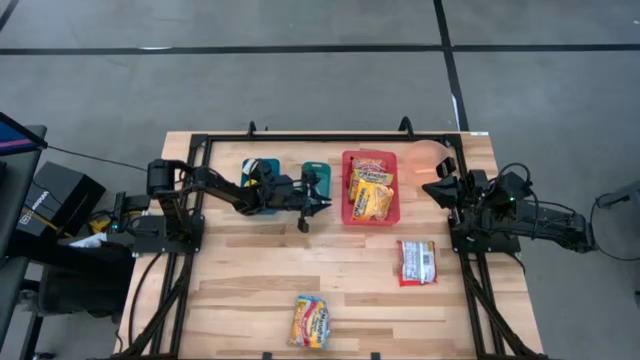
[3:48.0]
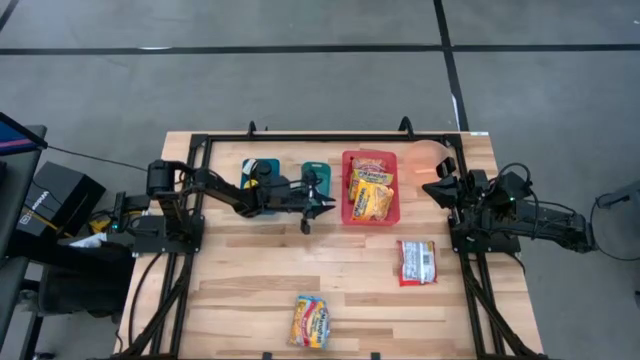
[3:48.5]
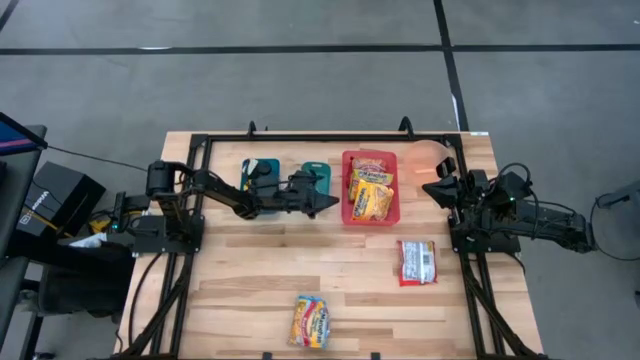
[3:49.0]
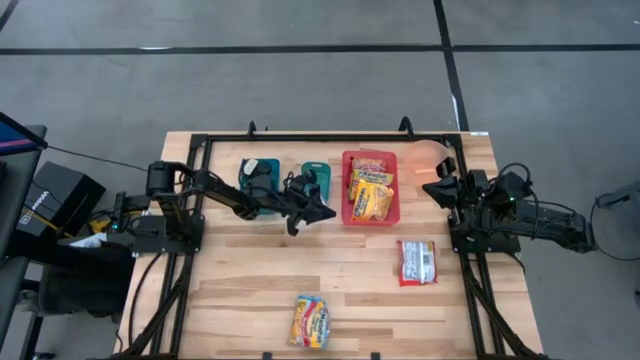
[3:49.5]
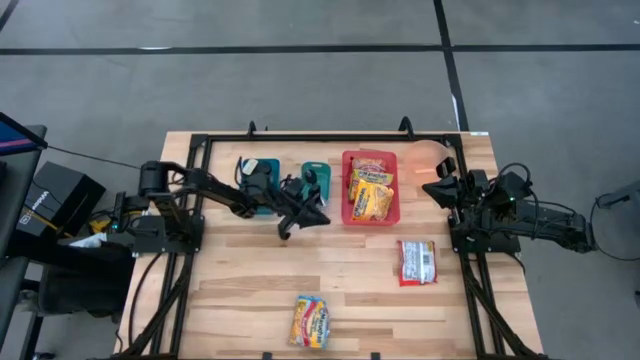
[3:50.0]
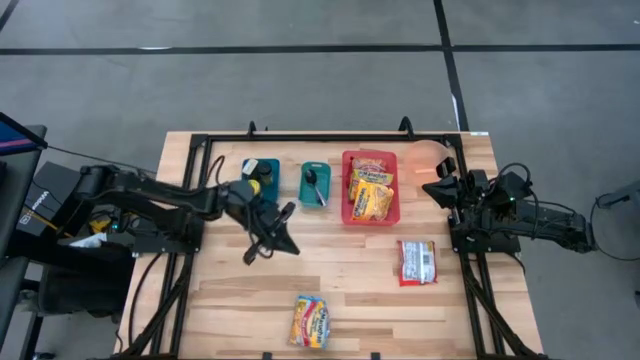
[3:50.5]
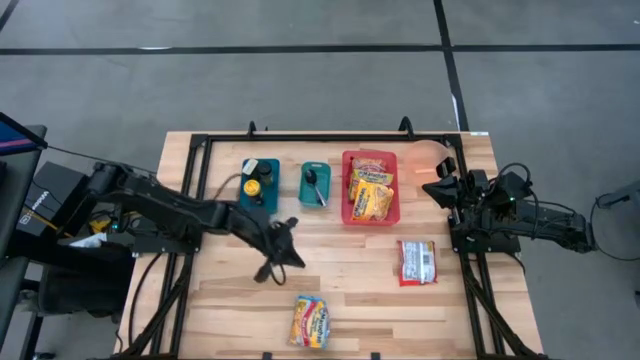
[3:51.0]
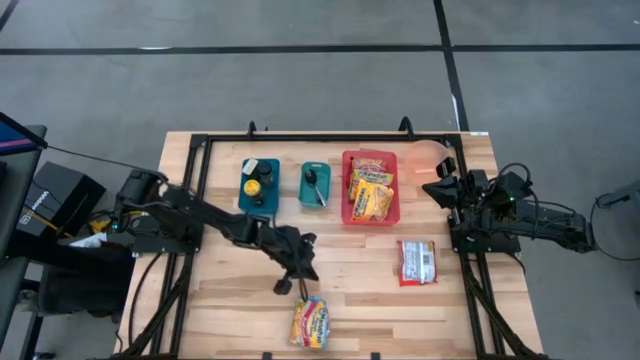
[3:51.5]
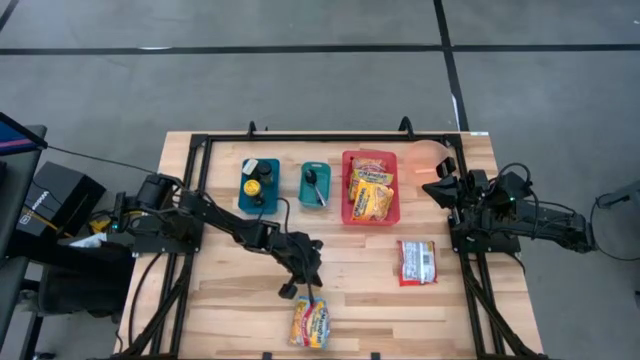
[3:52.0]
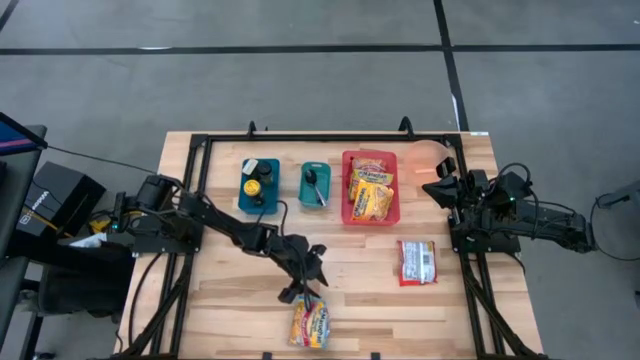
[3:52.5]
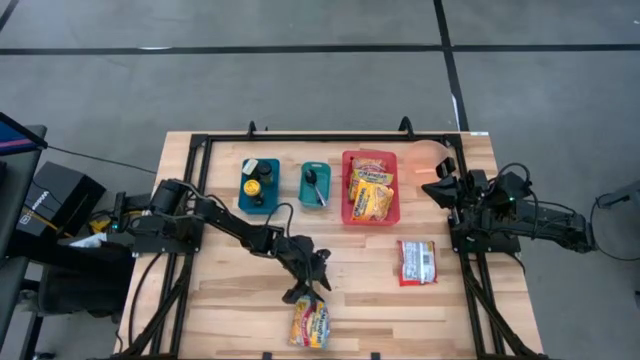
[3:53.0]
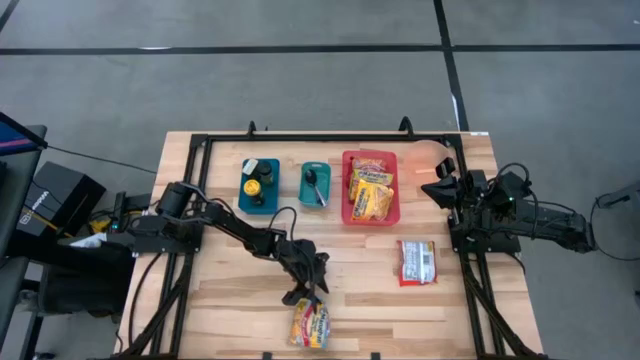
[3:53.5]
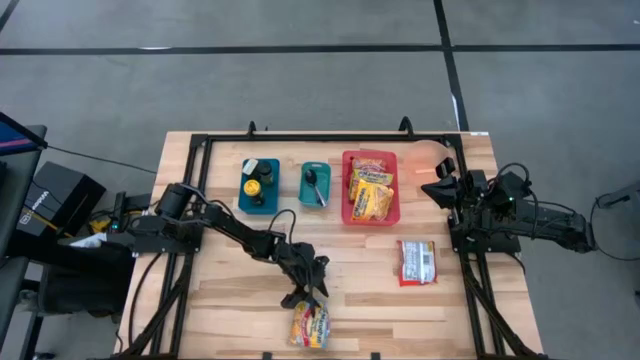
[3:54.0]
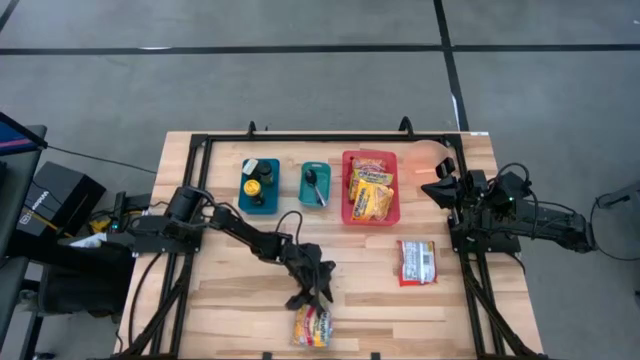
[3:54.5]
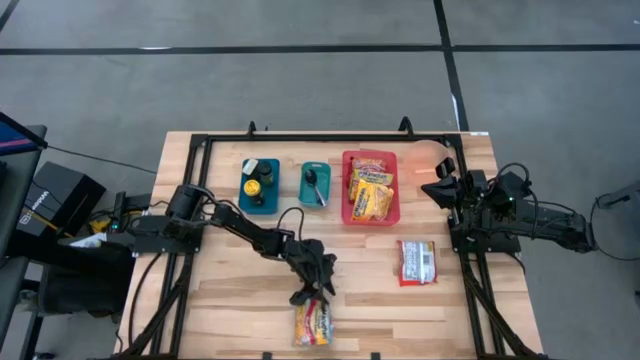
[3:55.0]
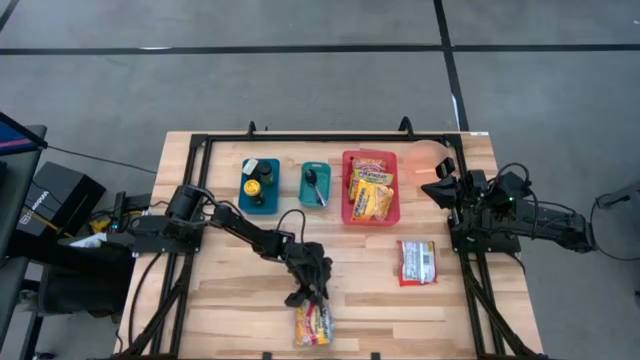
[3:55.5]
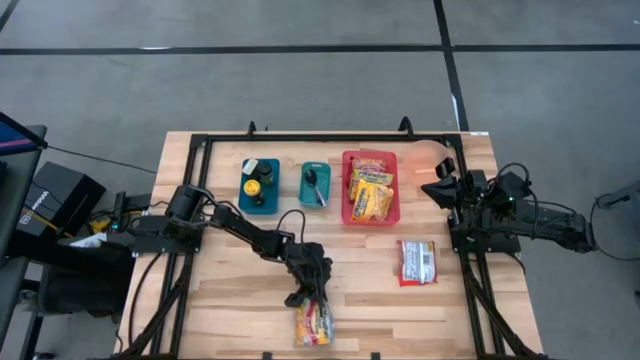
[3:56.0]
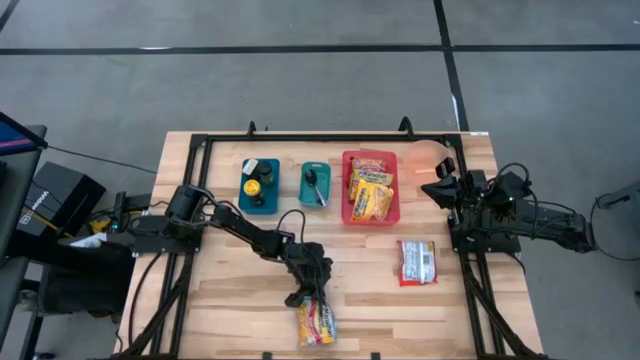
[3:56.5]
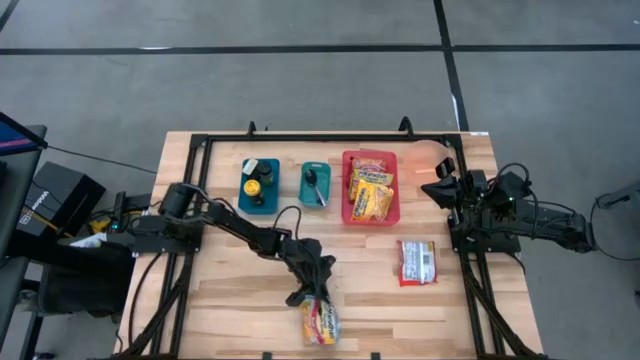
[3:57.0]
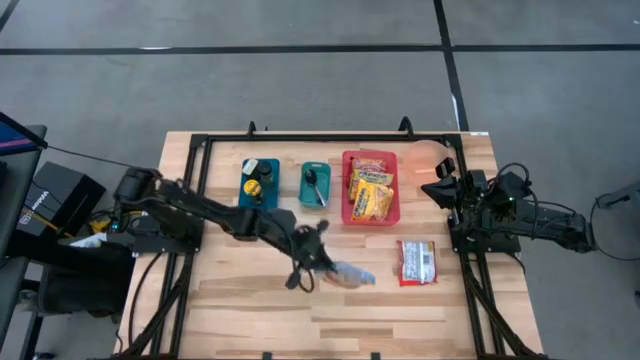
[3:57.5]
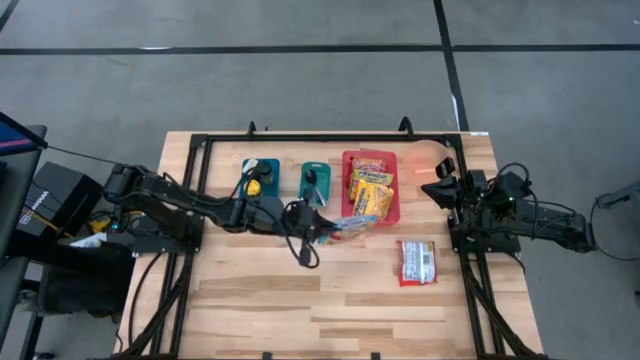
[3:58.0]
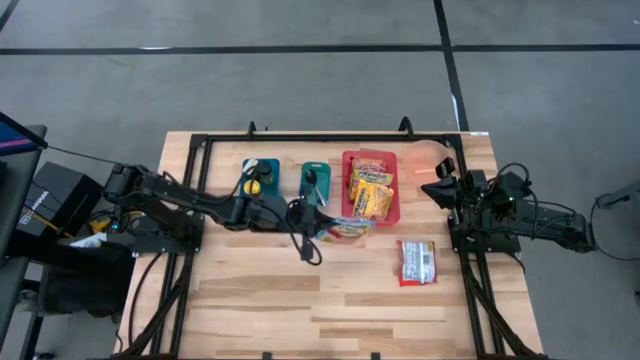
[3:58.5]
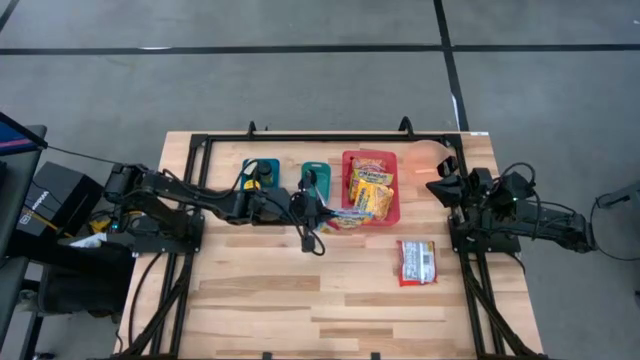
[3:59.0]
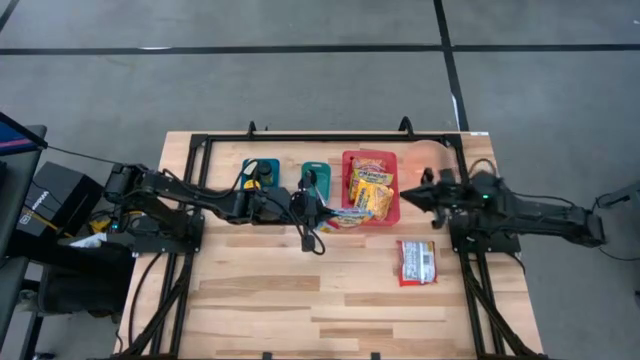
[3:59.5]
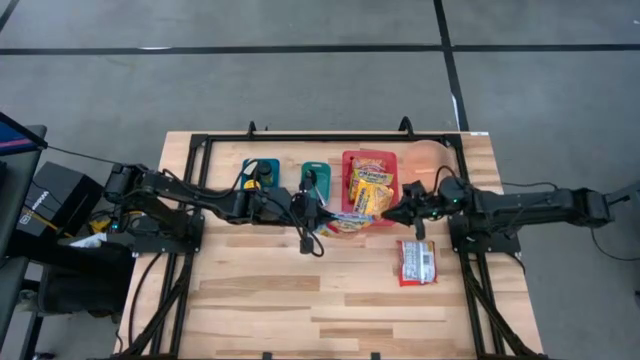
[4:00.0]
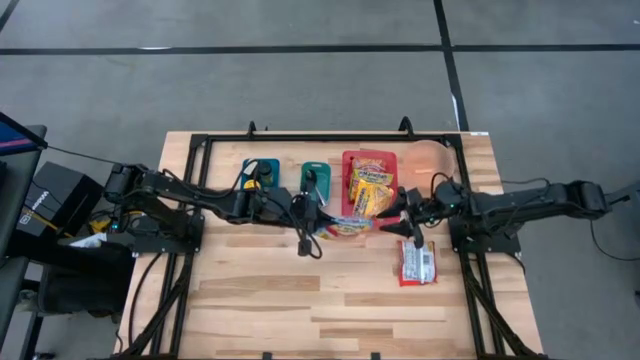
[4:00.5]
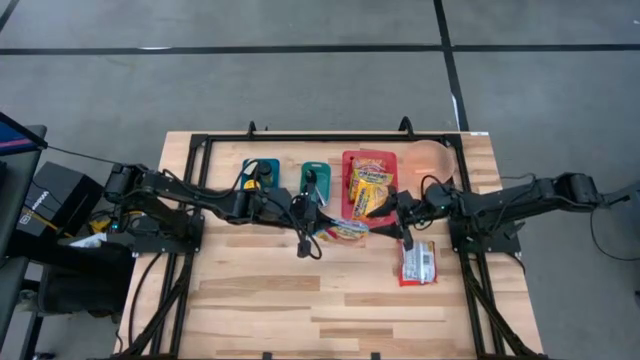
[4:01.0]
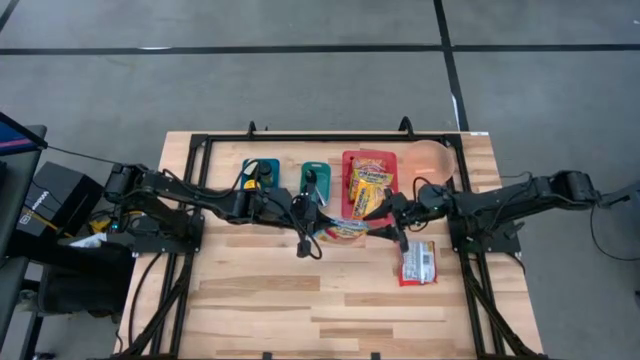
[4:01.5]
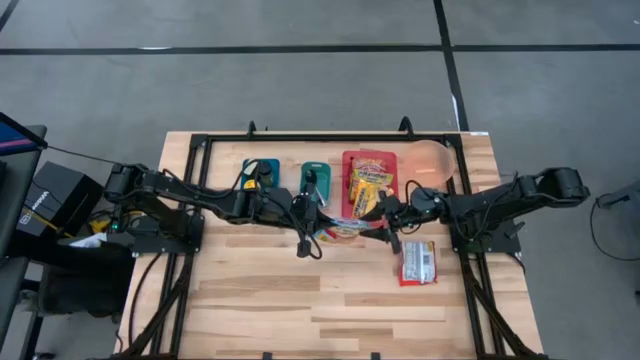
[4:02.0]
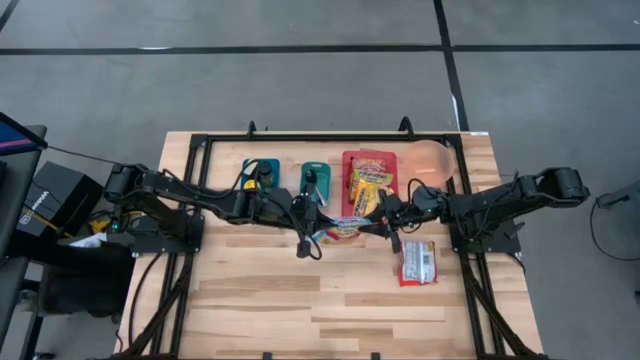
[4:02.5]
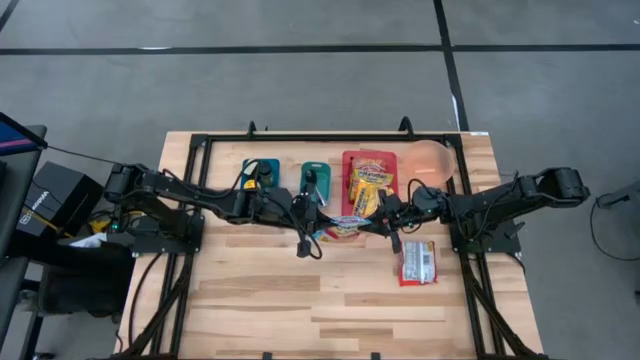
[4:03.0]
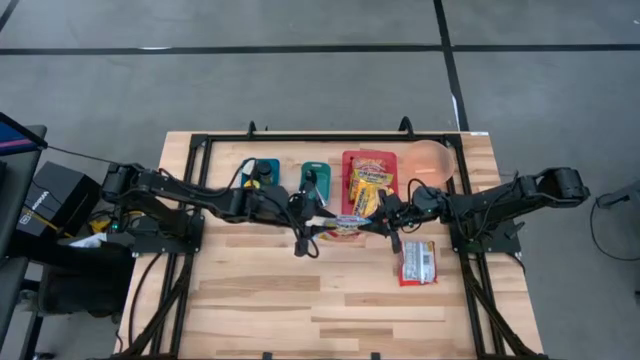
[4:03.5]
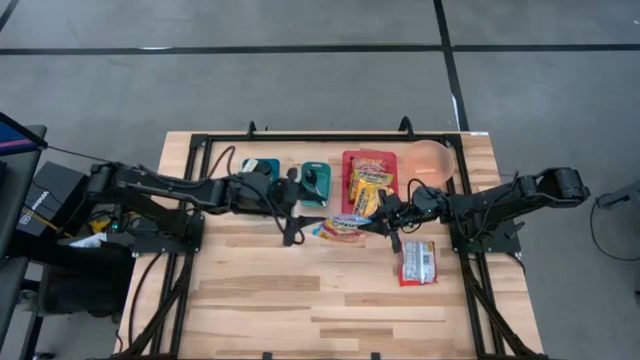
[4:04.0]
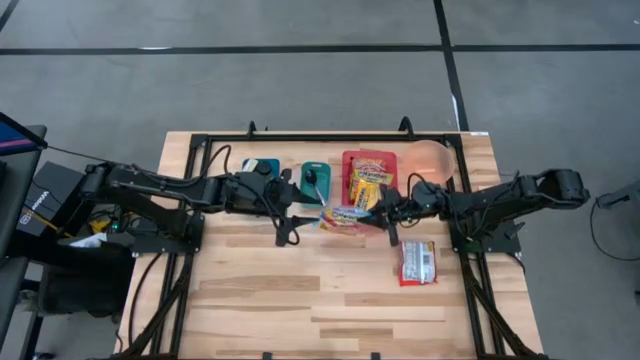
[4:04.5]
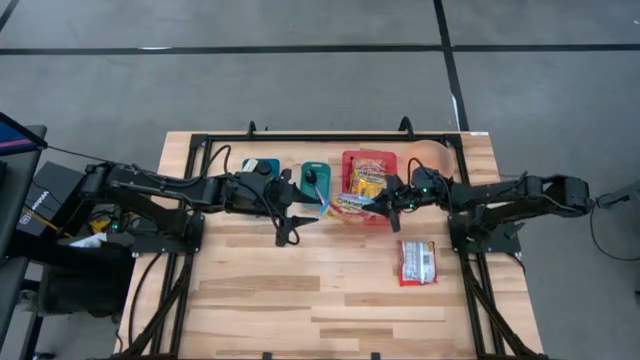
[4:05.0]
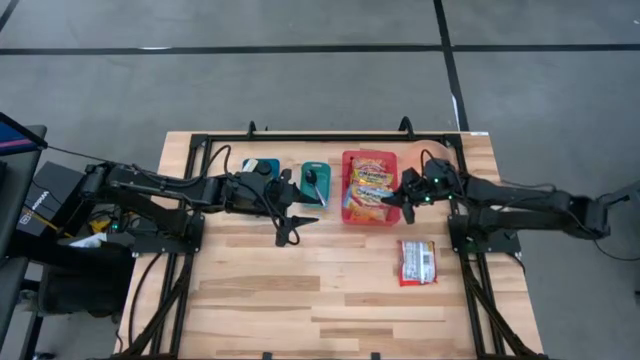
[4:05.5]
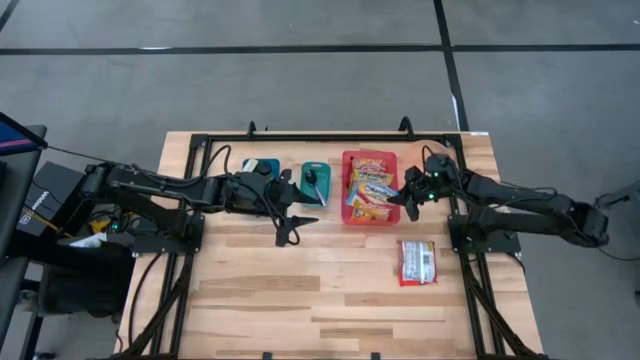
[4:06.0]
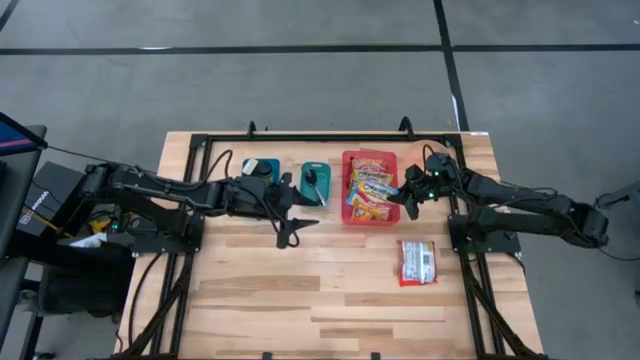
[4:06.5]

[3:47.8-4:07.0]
Task: Pick & Place Food Item
Put the light blue noodle pack into the red bin
